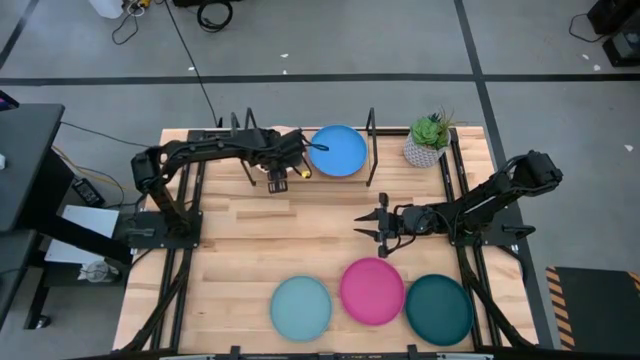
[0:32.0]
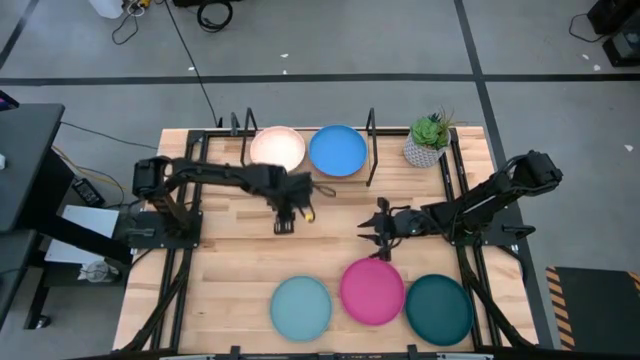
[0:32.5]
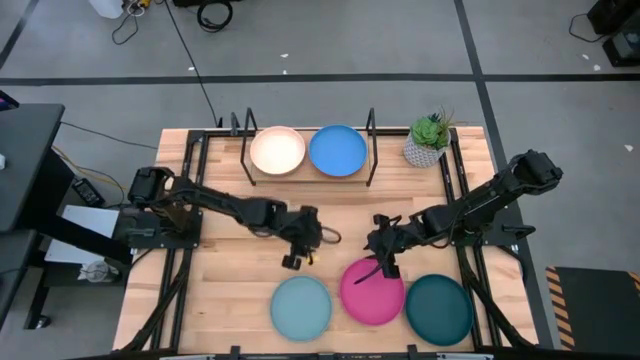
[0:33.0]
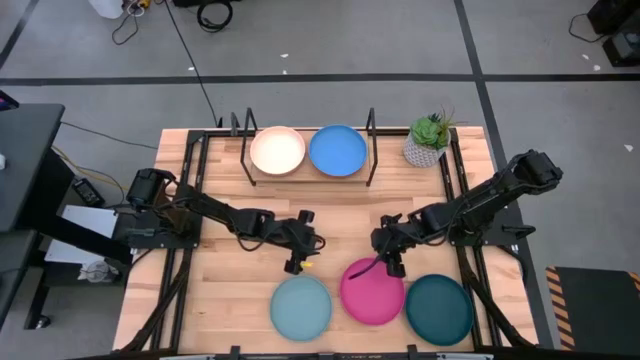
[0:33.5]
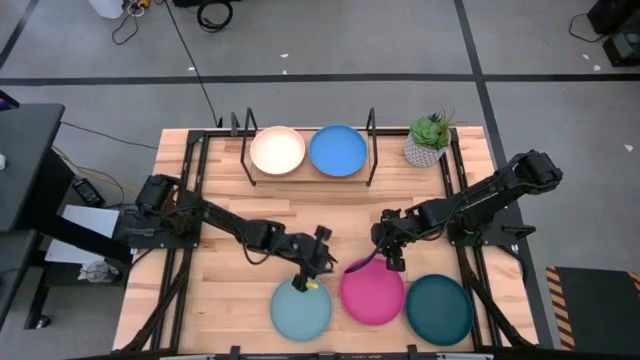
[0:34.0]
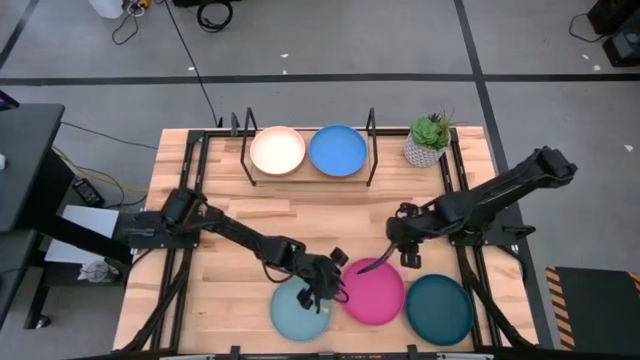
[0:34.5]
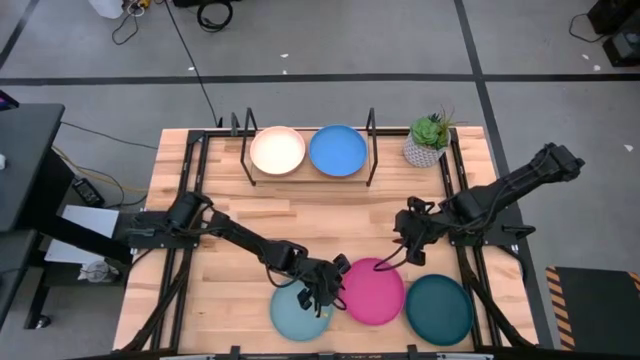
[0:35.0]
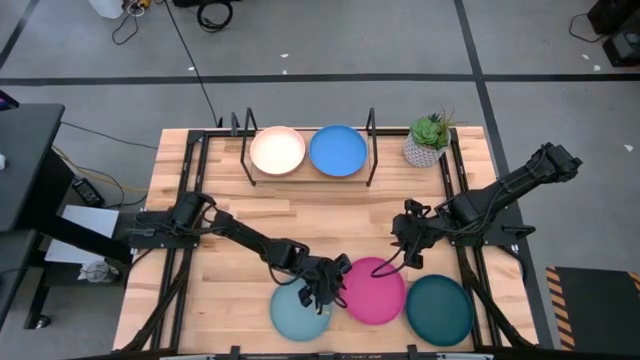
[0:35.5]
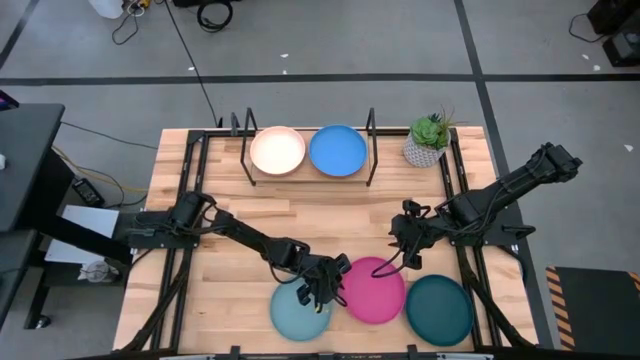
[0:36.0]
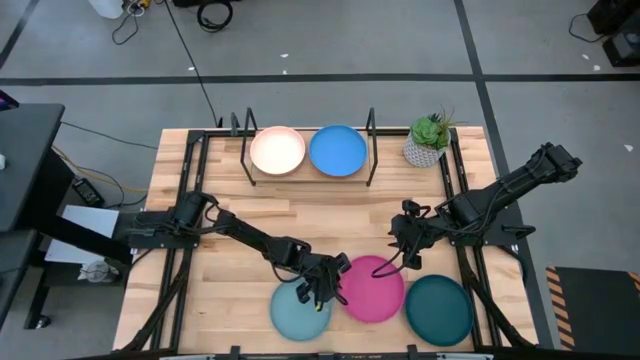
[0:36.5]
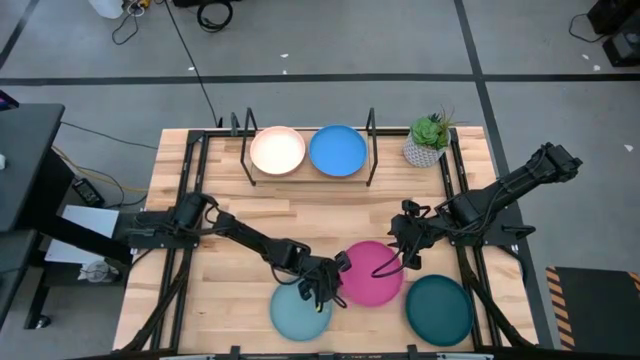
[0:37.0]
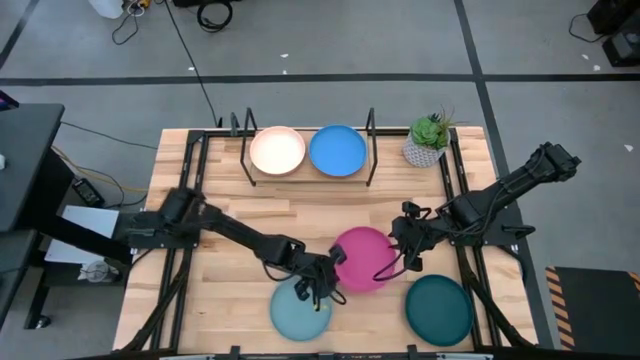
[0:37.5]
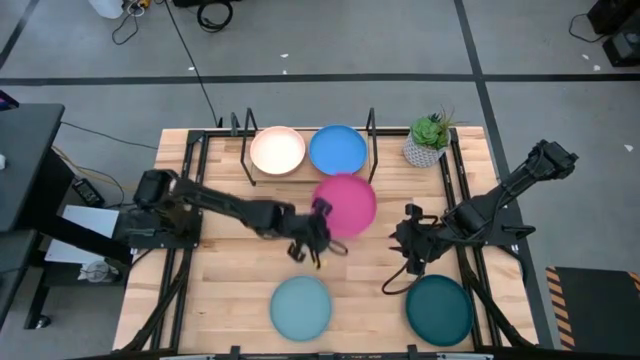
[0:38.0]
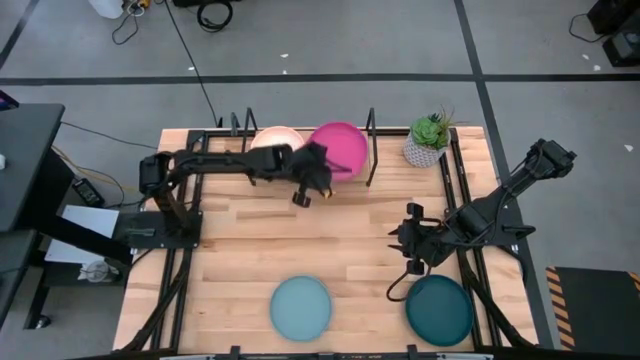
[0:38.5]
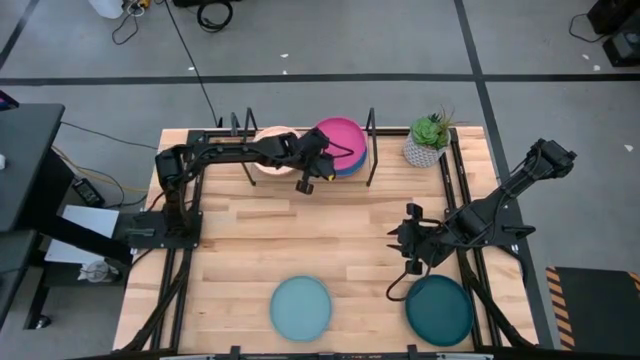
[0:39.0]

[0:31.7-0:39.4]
Task: Place and stack plates onto a shelf
Stack the pink plate on top of the blue plate on the shelf

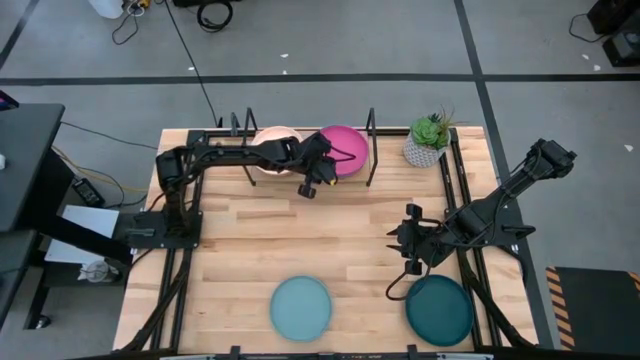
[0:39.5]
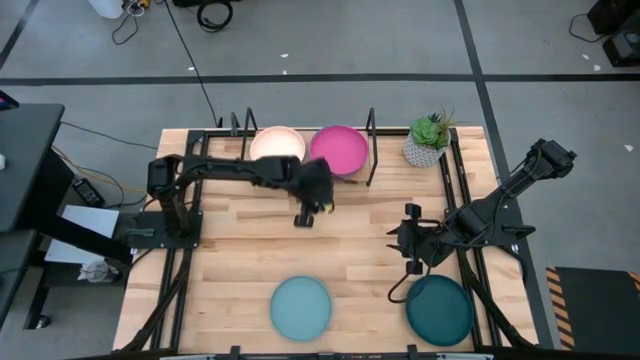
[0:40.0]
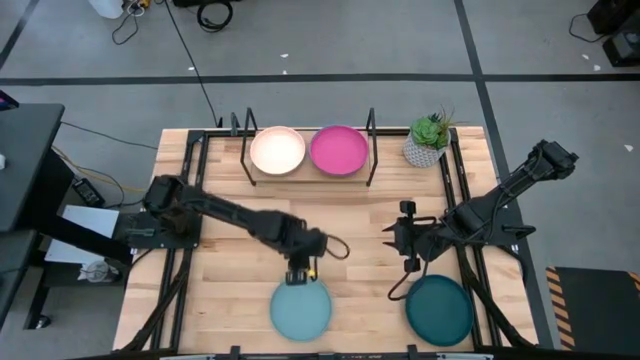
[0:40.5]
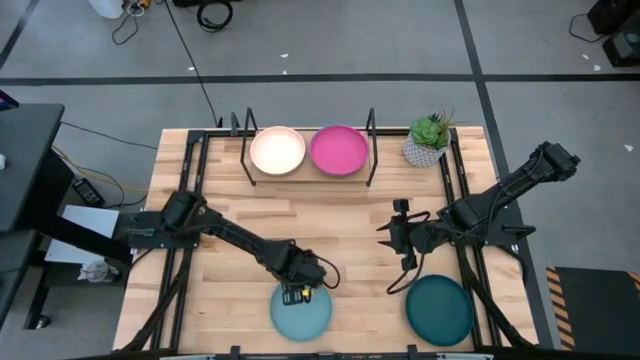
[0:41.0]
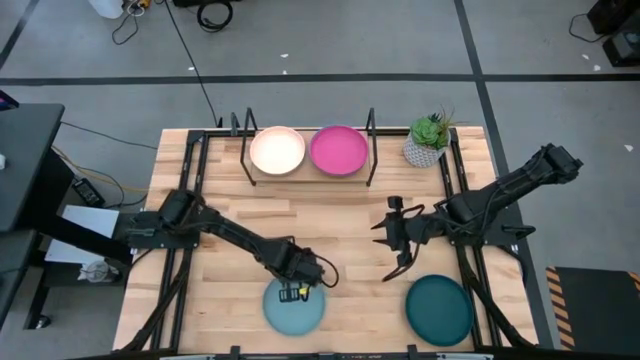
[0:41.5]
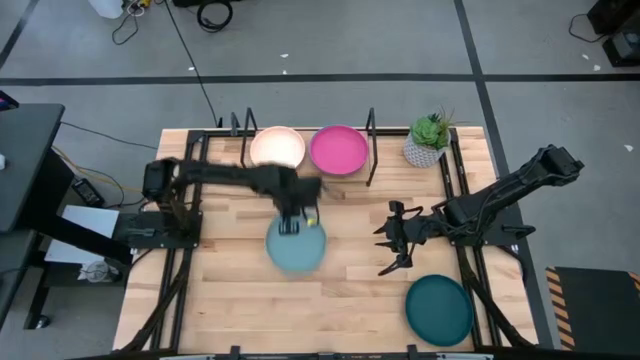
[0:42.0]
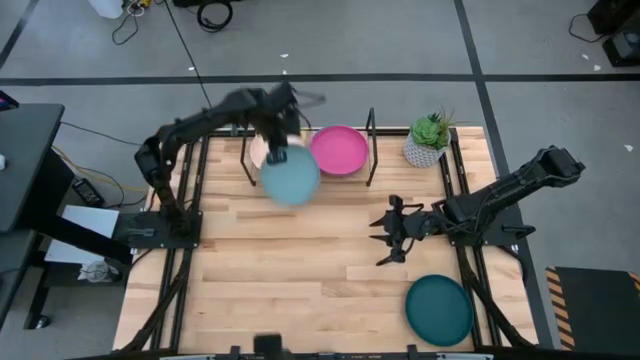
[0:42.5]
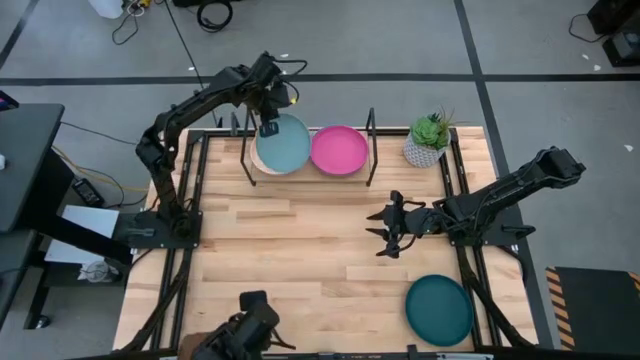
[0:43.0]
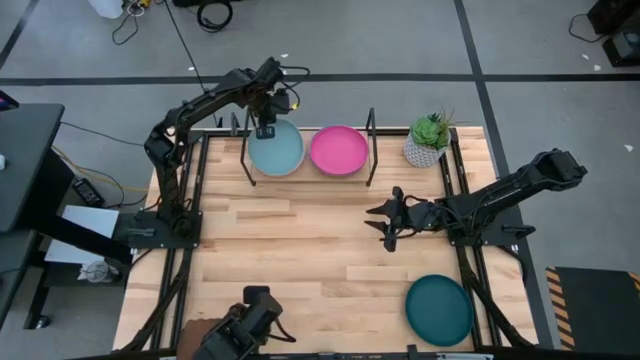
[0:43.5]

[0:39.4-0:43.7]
Stack the light blue plate on top of the white plate on the shelf

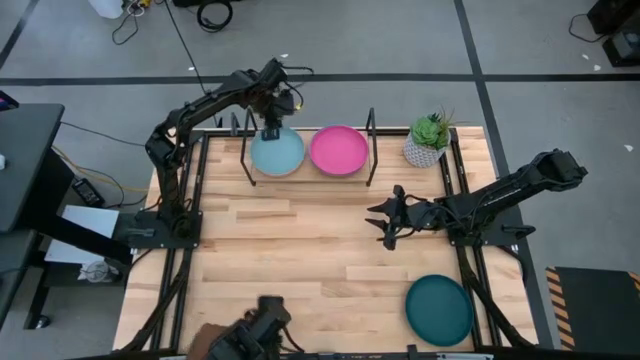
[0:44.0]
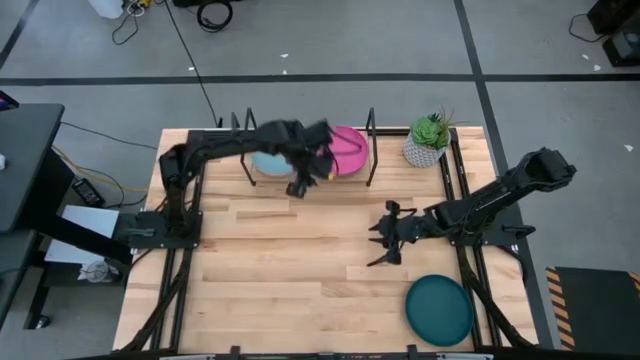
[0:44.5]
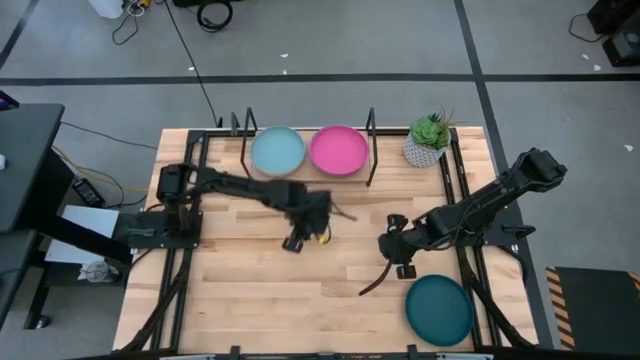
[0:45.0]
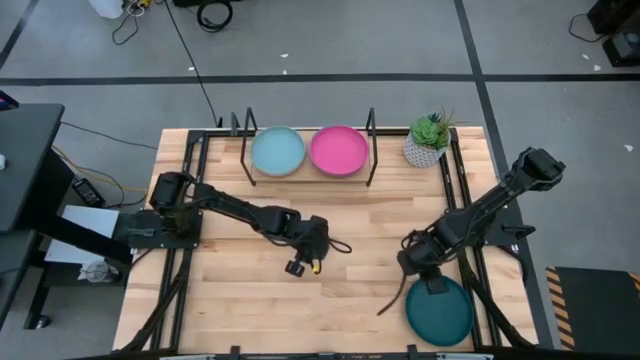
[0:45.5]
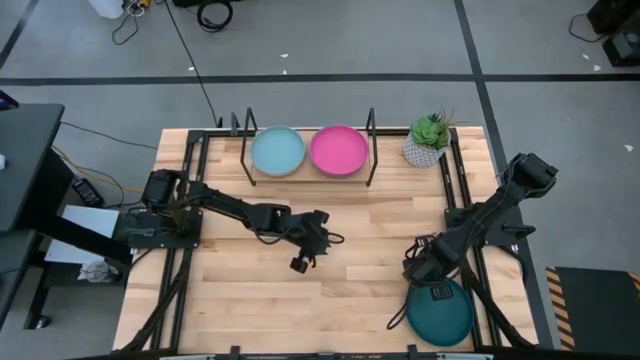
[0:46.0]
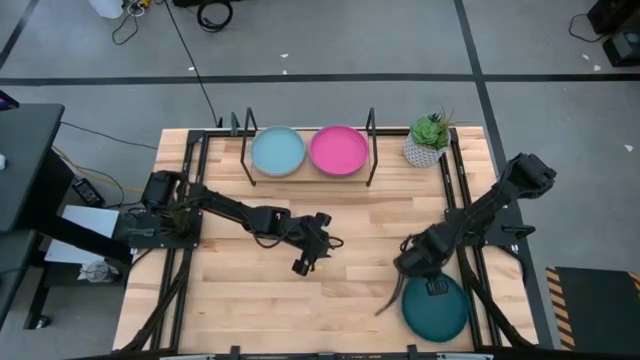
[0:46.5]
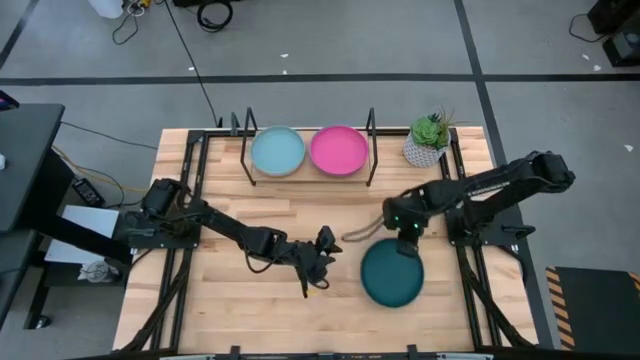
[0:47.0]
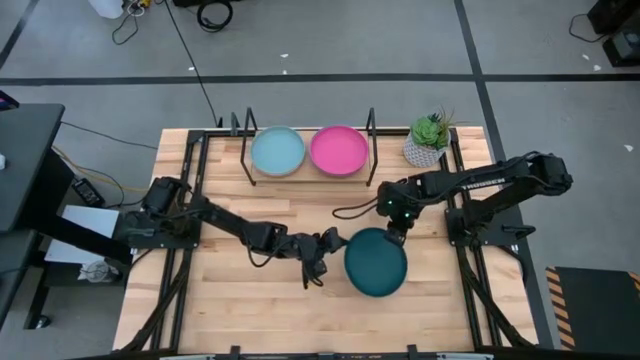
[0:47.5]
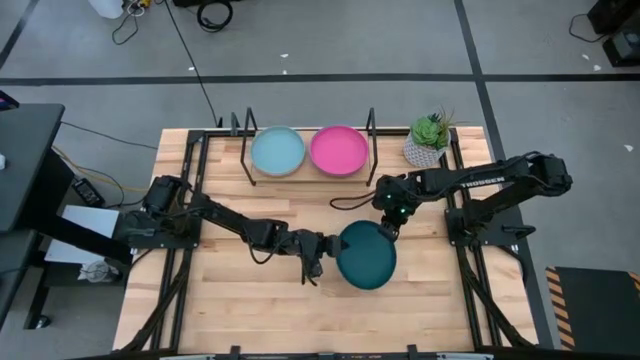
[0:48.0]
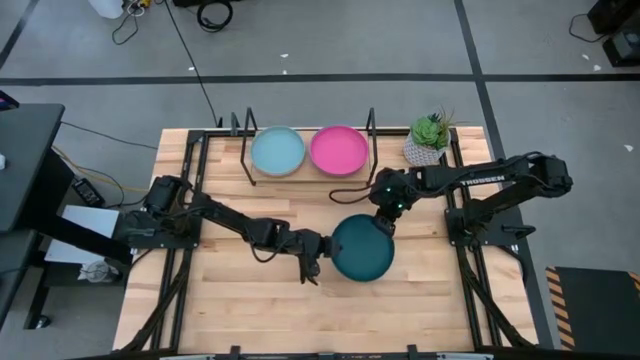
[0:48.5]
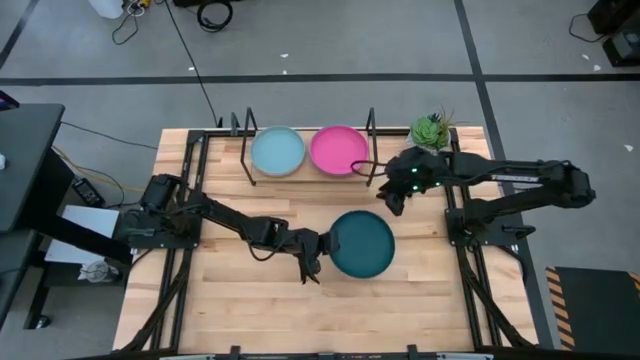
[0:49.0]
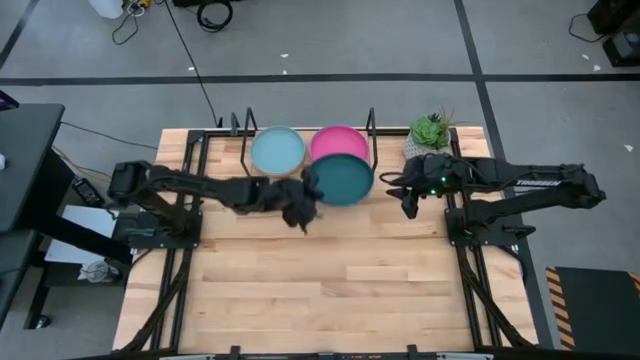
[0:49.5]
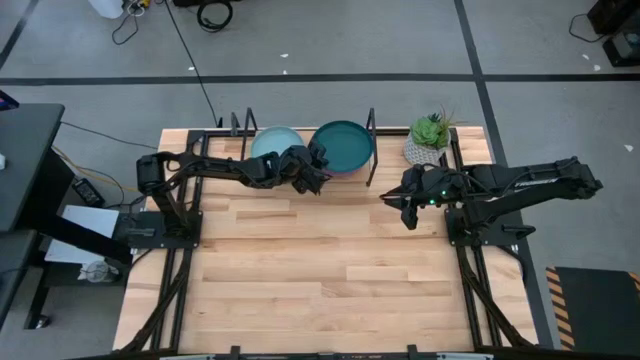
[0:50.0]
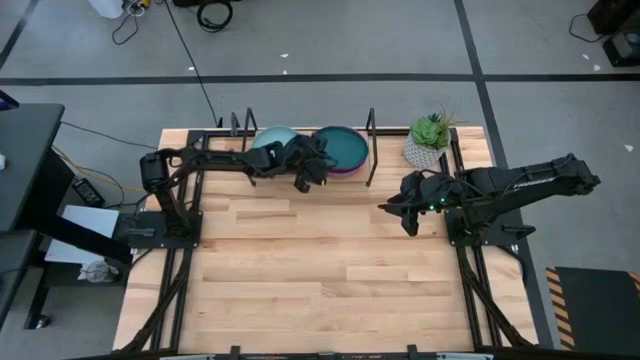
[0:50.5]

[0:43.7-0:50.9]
Stack the dark blue plate on top of the pink plate on the shelf

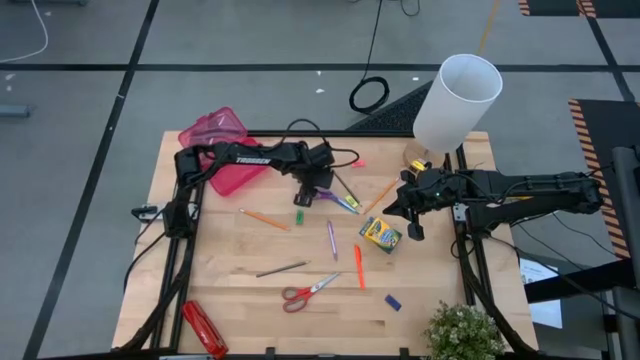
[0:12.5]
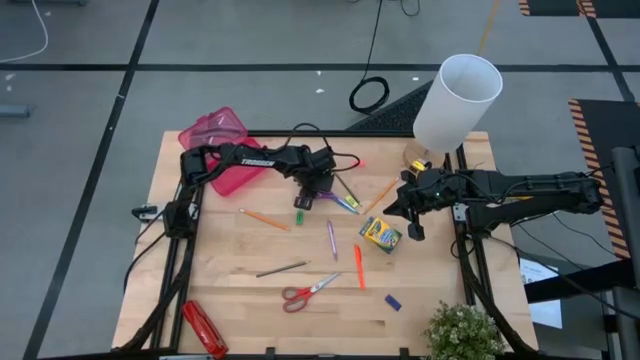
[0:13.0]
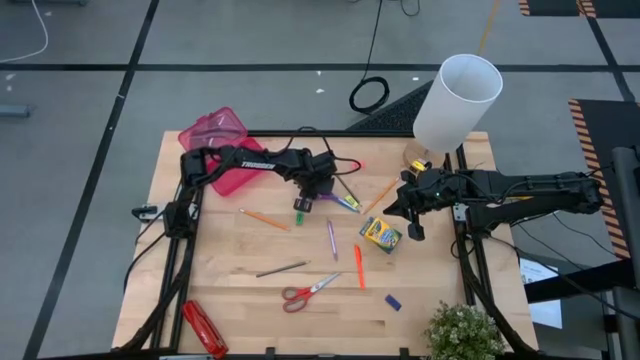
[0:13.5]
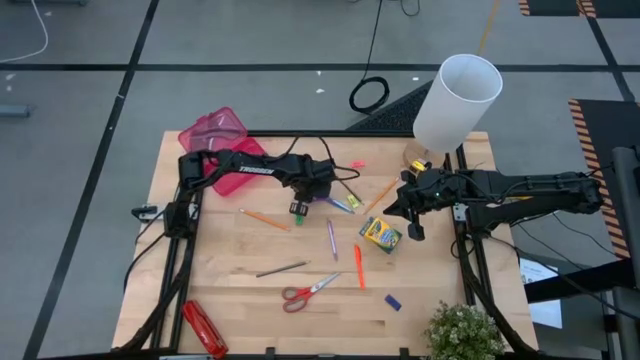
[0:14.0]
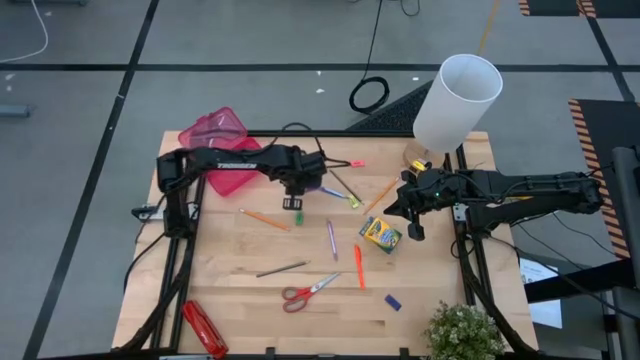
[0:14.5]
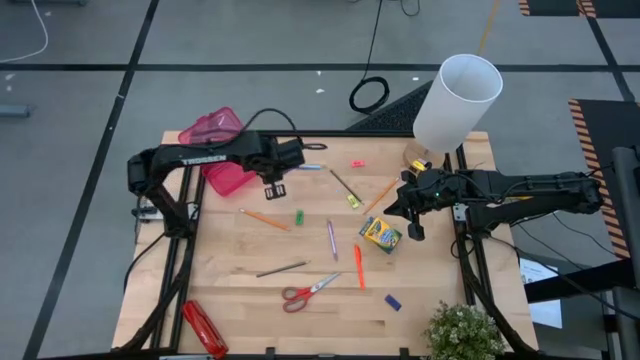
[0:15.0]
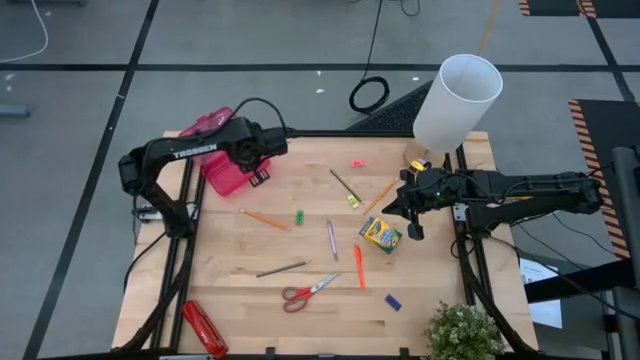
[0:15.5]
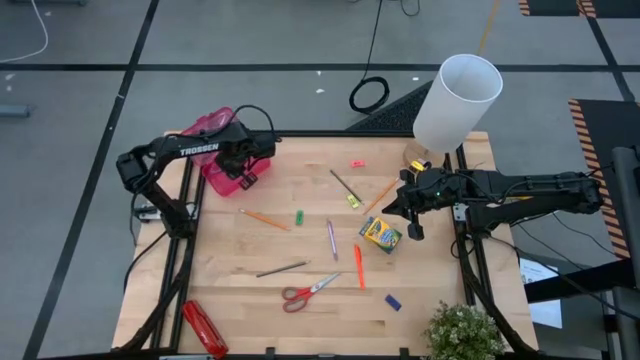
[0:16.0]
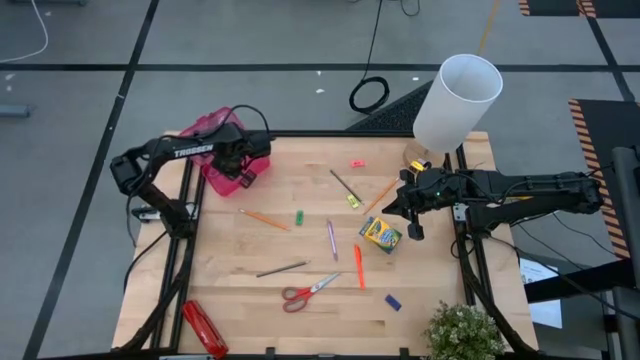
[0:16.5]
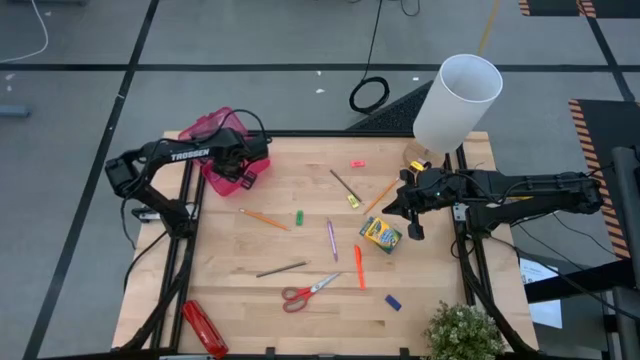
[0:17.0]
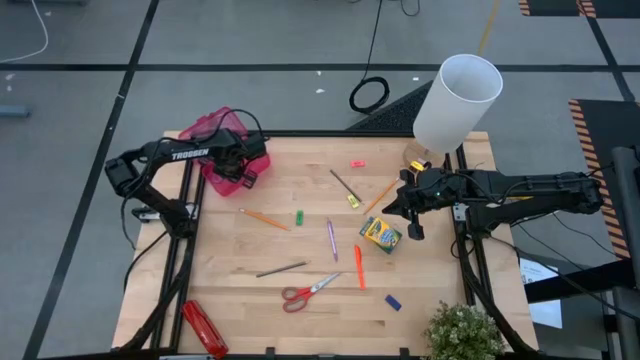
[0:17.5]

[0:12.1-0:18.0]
Task: Pack school essentials
Put the violet scissors into the pink supply box
